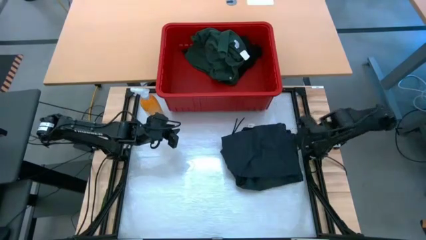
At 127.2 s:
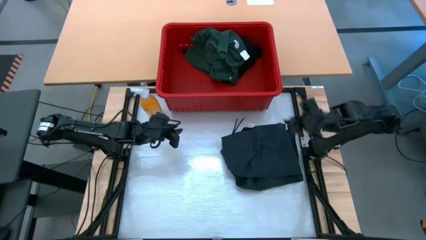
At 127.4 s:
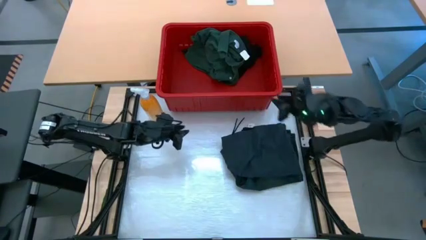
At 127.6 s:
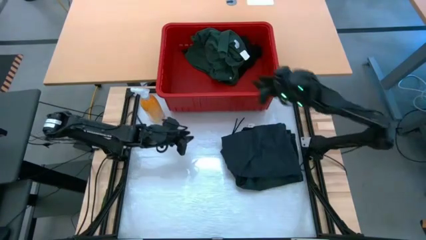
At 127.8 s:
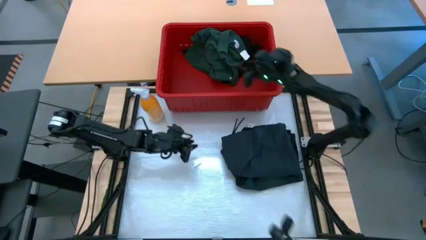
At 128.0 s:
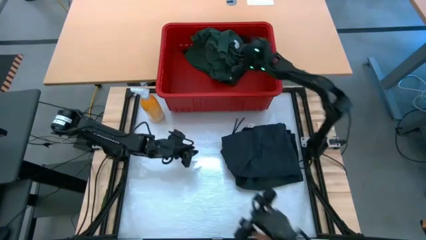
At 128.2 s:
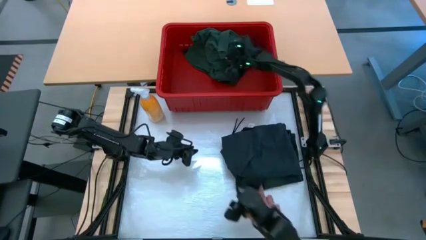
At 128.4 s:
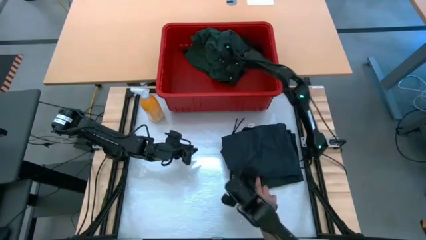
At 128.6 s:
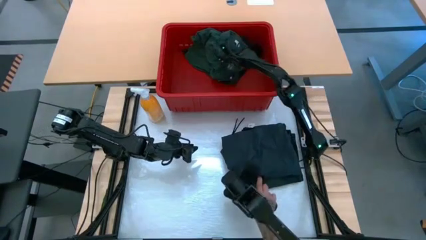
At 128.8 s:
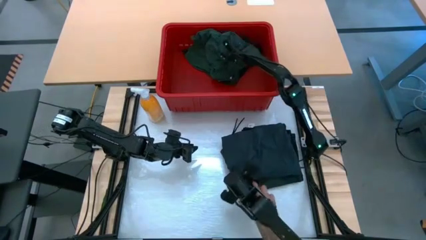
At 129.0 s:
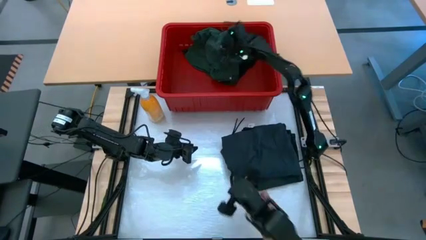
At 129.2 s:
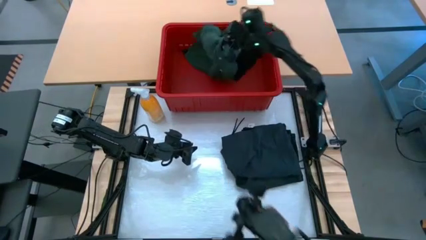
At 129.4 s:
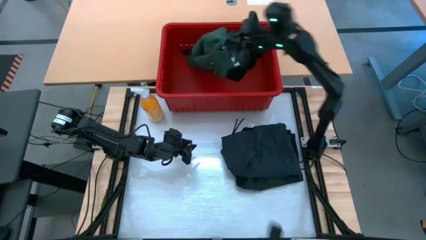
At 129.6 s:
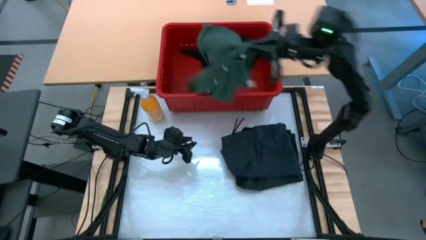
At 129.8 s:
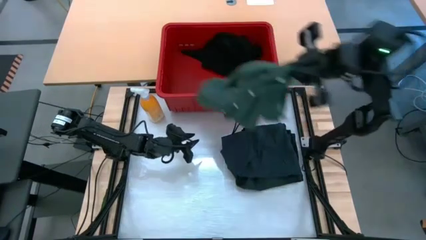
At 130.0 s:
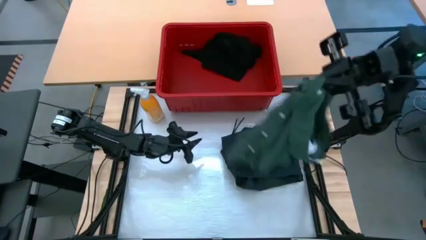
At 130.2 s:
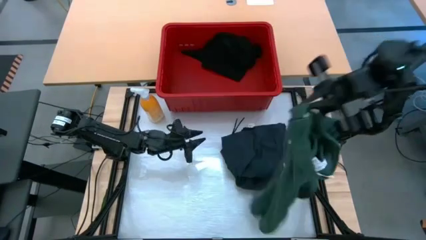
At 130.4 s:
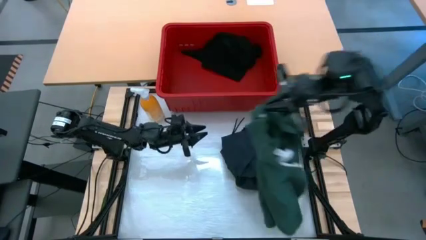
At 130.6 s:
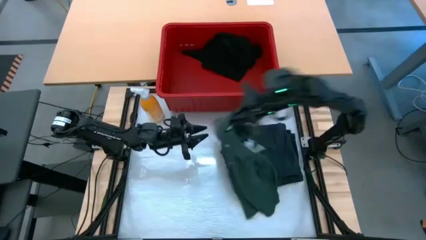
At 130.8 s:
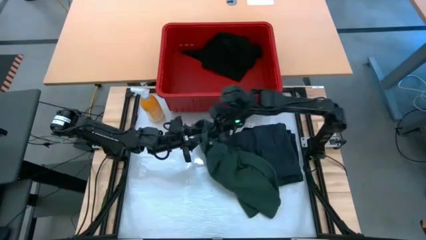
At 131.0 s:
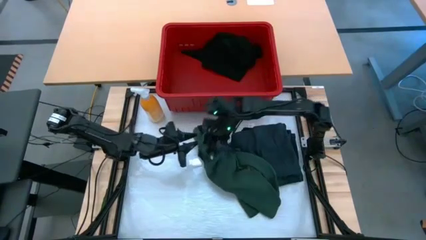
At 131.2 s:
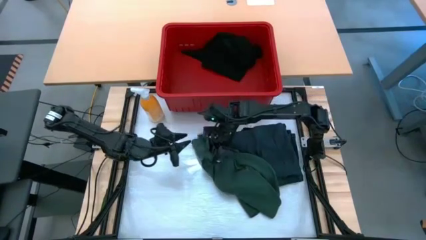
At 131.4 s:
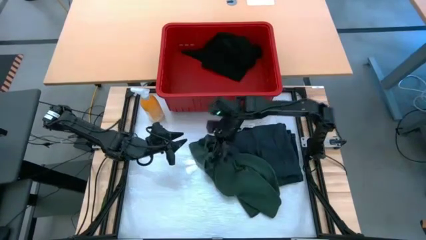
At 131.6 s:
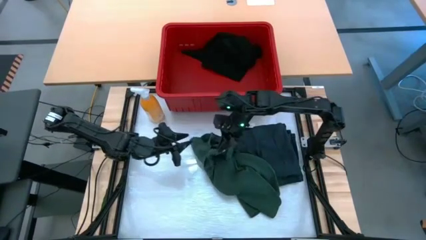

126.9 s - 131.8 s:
Task: Fold laundry
Remove the green shirt from the red bin

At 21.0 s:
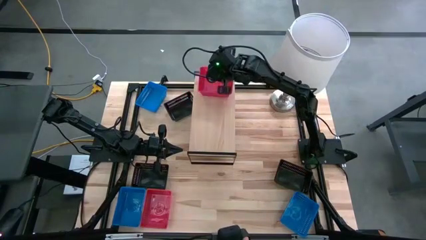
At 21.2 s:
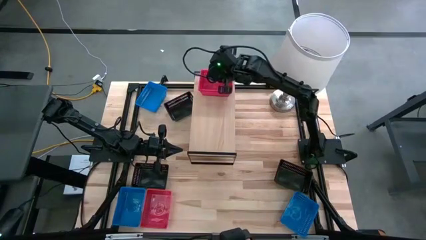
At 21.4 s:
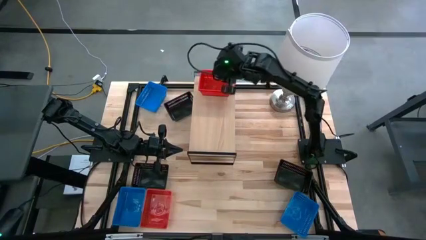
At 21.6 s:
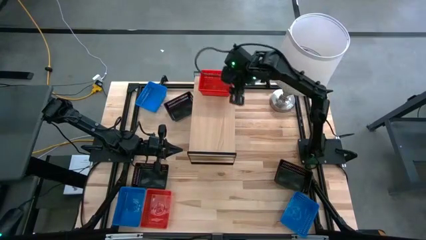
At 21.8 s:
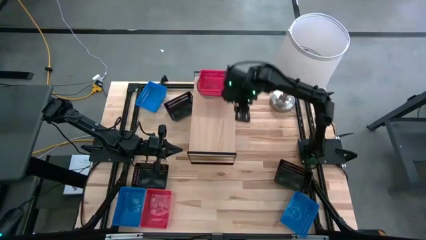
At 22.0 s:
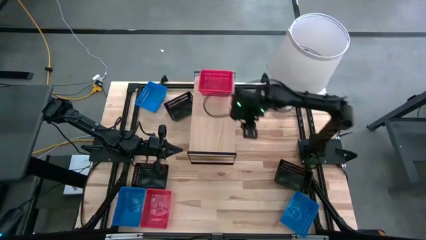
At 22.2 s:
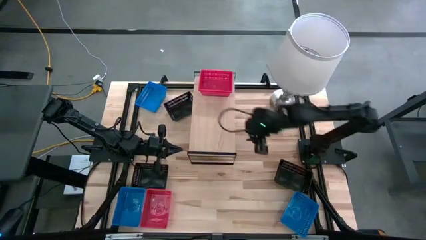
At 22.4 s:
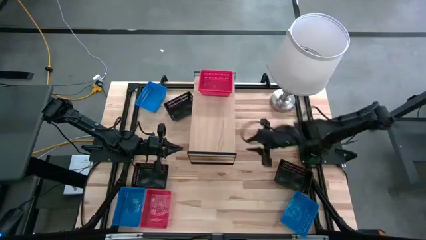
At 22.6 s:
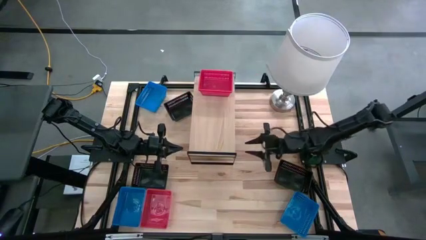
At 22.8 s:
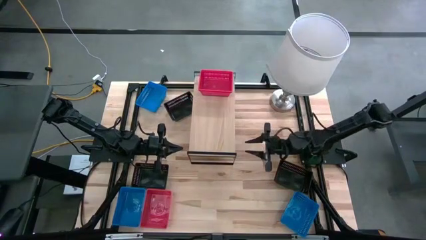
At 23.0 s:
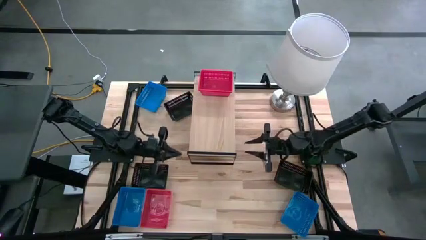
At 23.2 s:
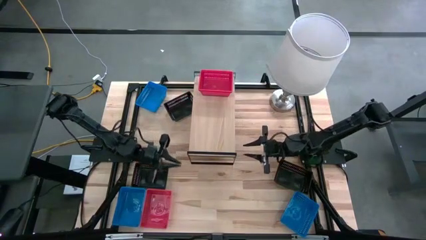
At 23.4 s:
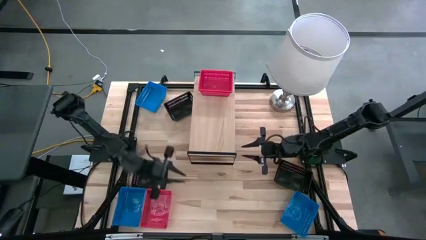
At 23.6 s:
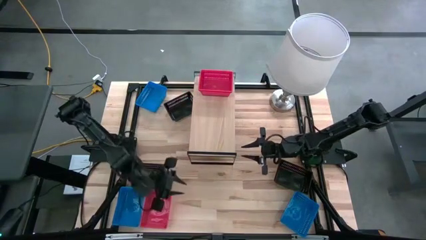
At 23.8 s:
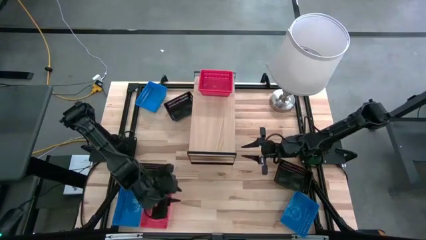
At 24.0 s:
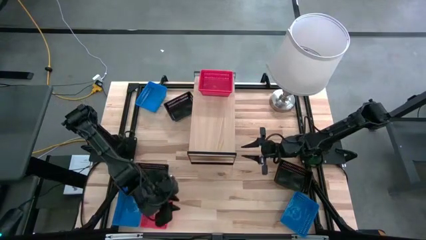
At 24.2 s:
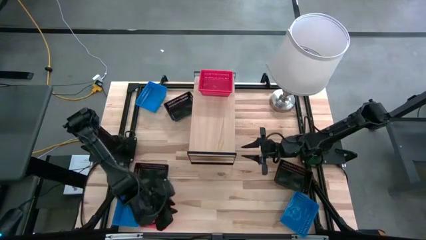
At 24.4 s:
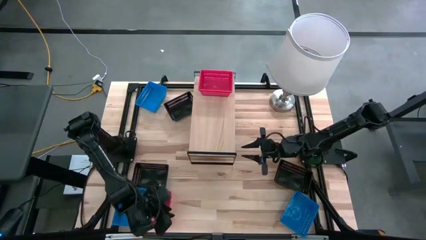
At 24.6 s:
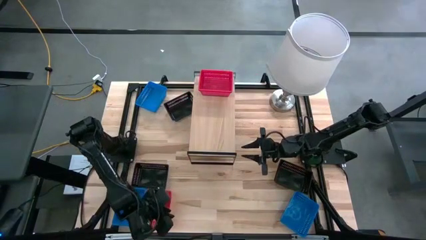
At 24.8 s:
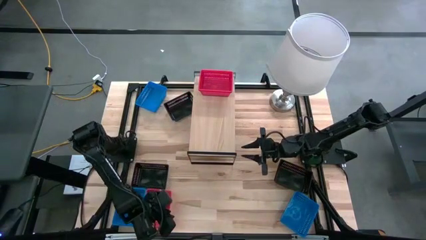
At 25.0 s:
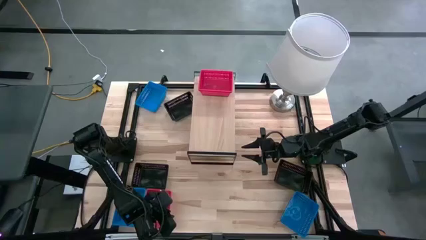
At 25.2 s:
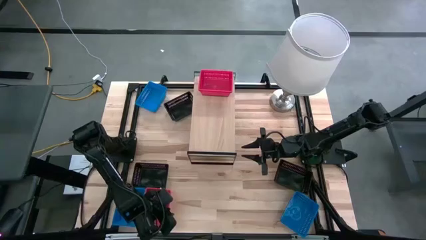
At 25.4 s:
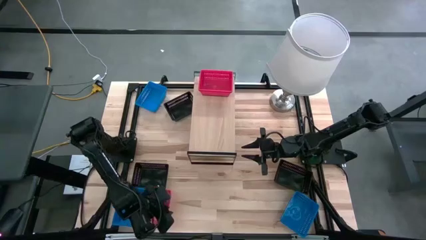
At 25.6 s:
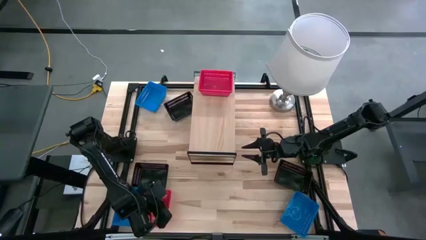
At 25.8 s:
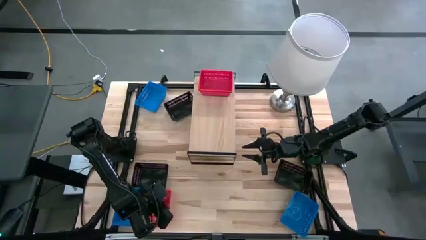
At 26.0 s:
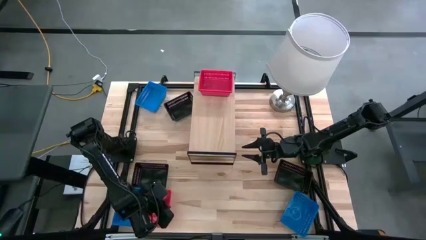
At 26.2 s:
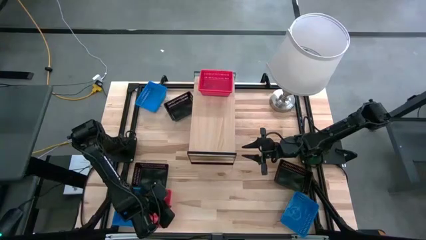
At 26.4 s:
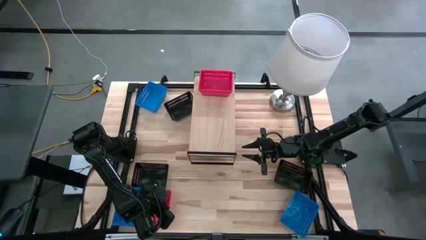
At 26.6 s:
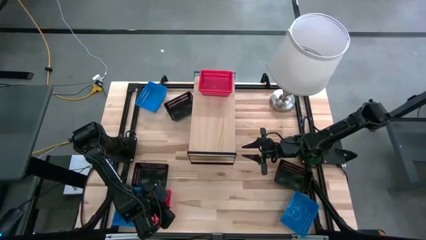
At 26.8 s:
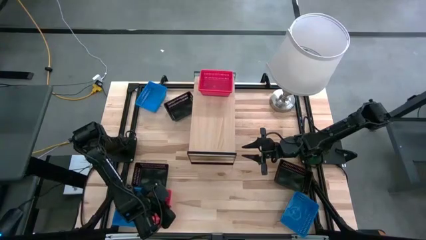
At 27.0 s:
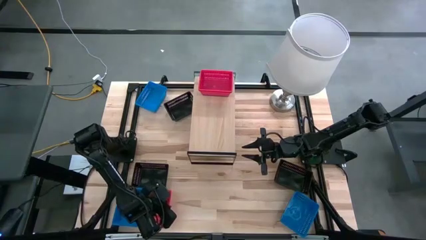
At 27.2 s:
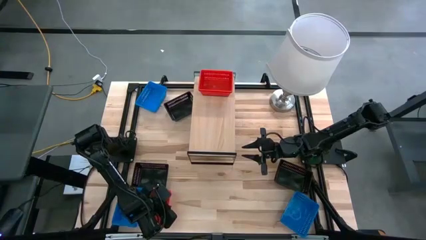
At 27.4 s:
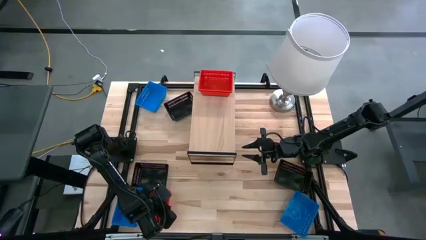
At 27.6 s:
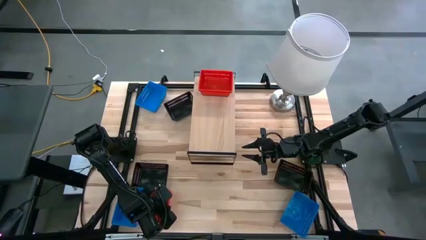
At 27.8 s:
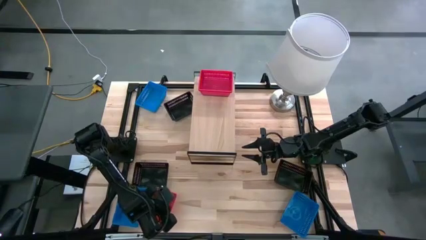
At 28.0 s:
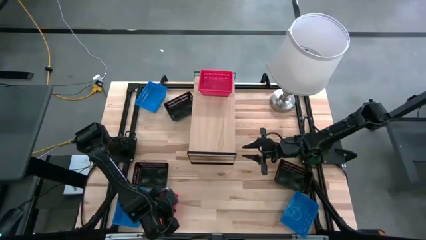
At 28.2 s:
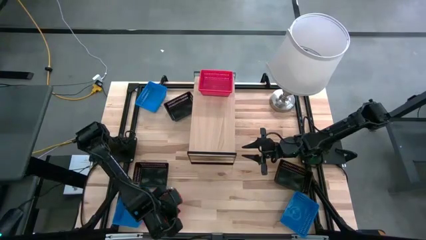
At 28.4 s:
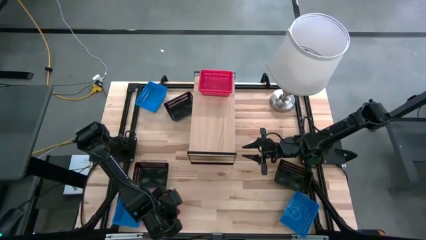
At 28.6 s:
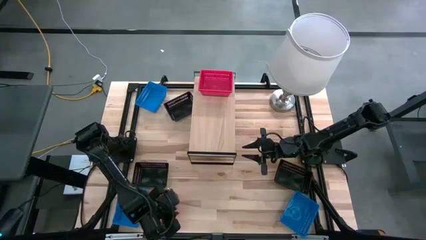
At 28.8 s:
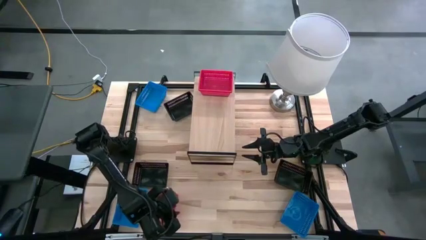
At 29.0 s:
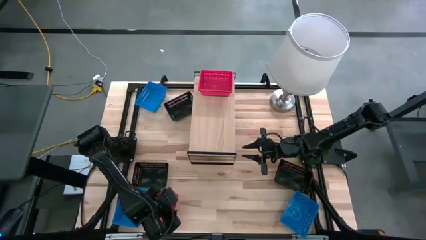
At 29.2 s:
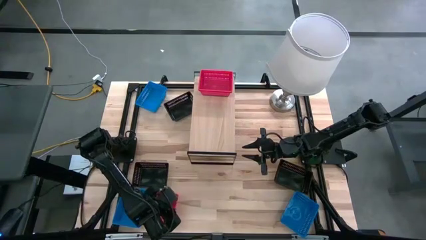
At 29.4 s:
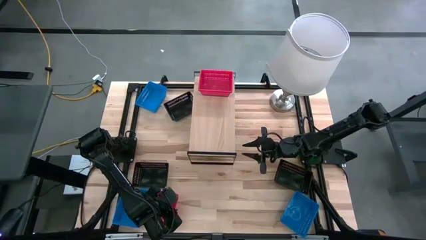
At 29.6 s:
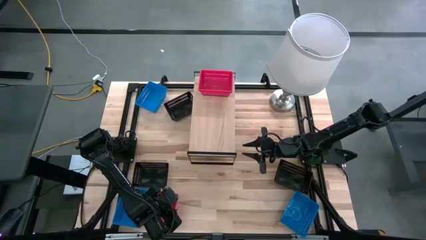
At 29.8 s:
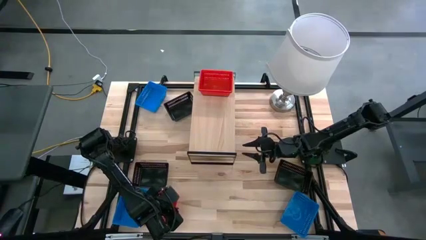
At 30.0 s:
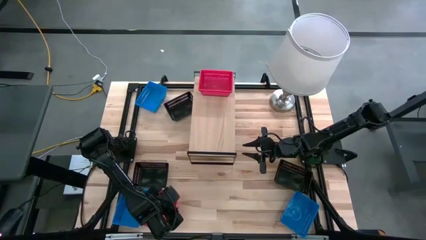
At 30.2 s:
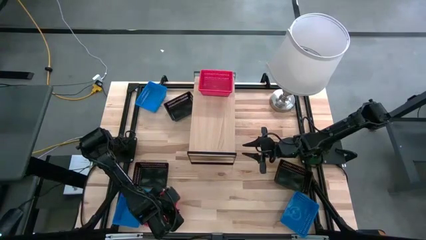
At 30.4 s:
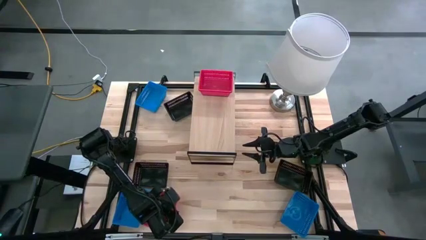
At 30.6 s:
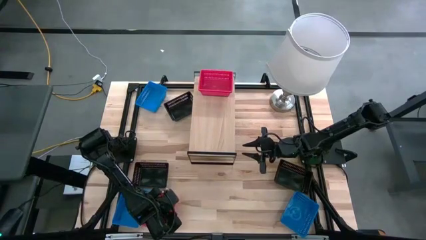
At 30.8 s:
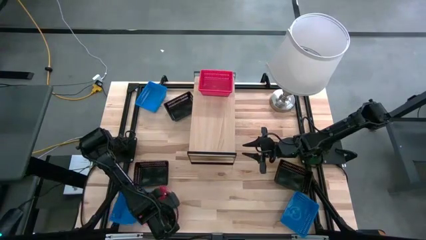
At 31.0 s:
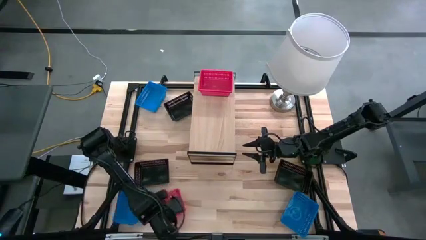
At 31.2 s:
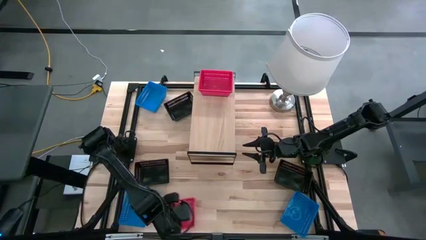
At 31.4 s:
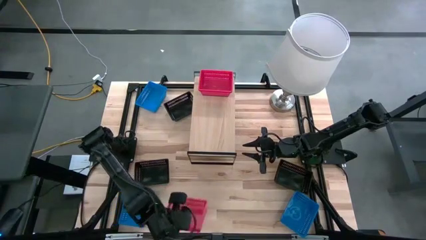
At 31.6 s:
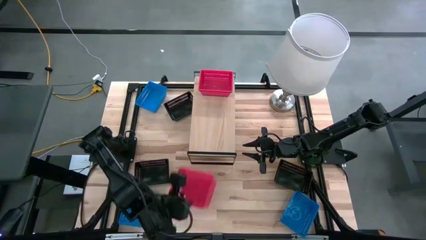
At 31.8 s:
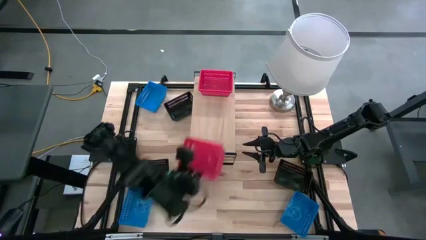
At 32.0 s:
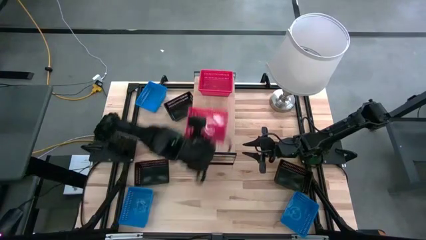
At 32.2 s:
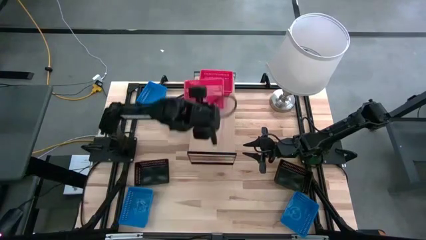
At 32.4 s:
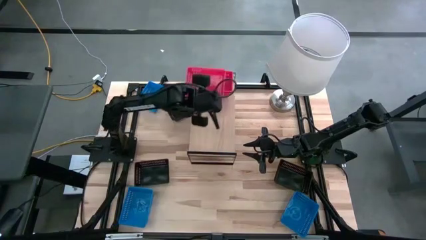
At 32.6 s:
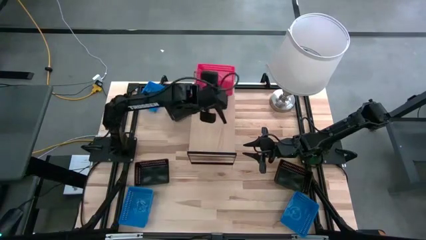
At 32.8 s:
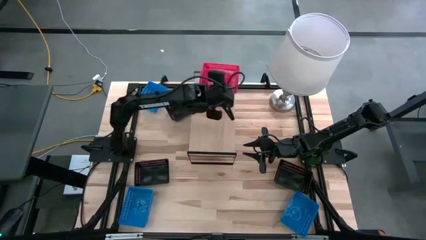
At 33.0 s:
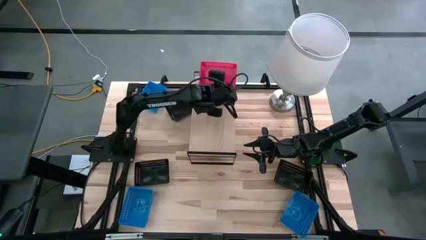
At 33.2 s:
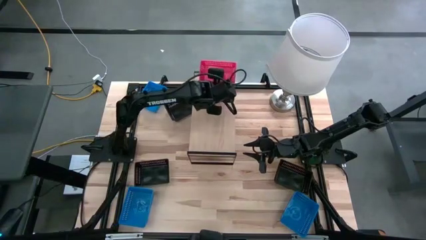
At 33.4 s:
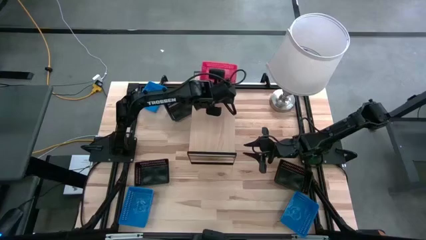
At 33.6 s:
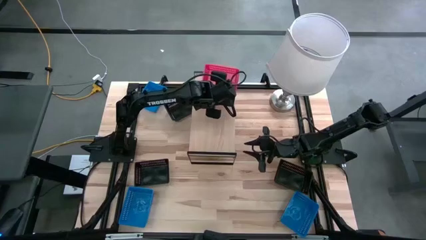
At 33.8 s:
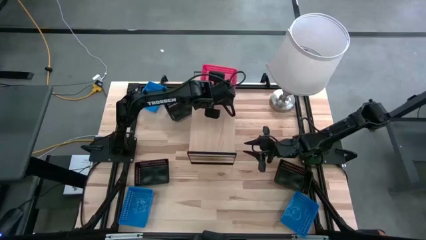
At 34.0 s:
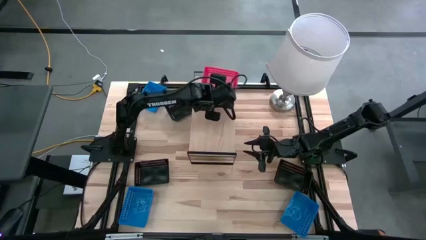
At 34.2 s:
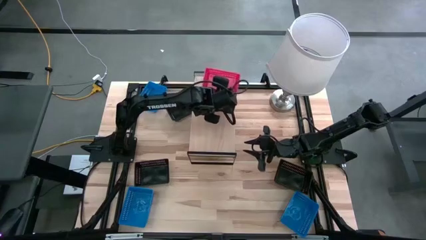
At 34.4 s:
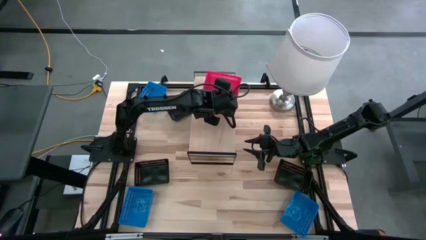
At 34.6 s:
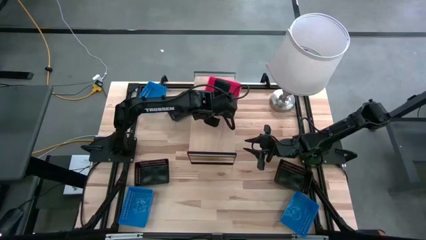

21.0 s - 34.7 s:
Task: Stack baskets on shelf by color
Stack the red bin on top of the red bin on the shelf
